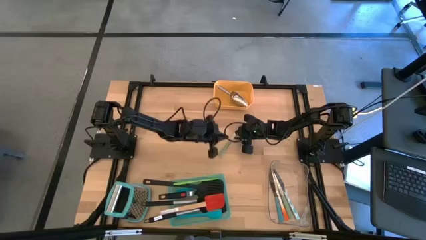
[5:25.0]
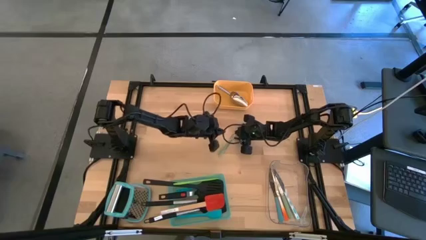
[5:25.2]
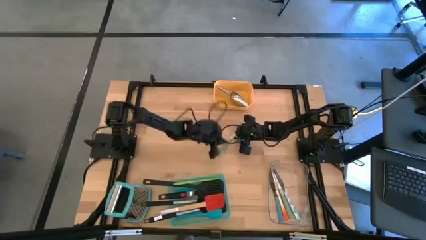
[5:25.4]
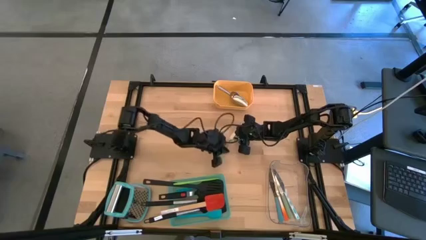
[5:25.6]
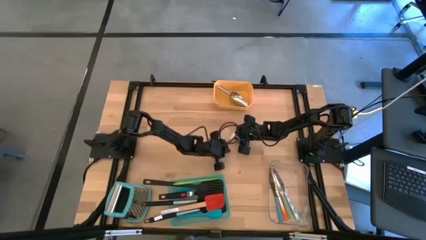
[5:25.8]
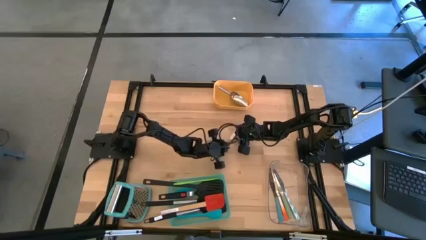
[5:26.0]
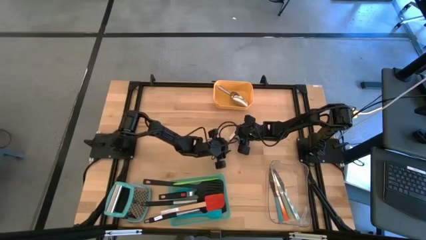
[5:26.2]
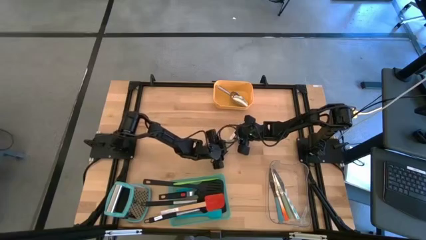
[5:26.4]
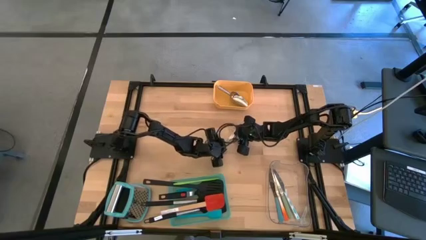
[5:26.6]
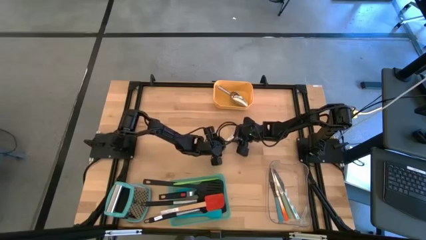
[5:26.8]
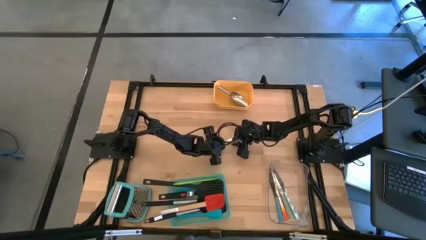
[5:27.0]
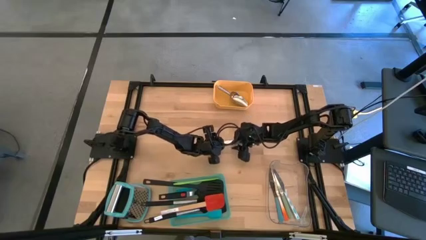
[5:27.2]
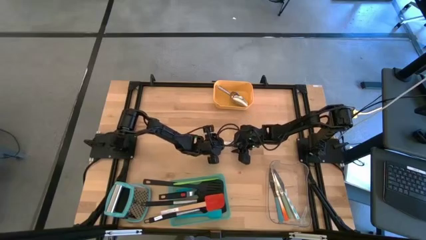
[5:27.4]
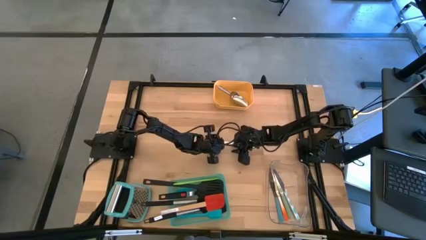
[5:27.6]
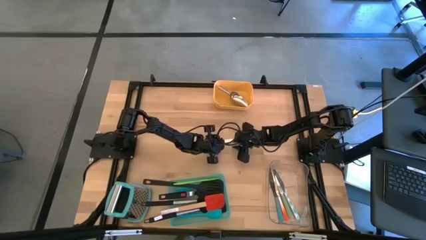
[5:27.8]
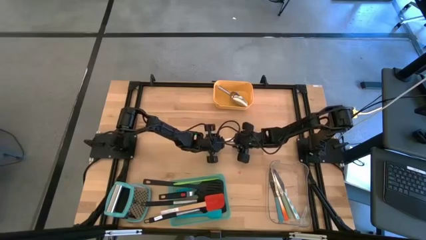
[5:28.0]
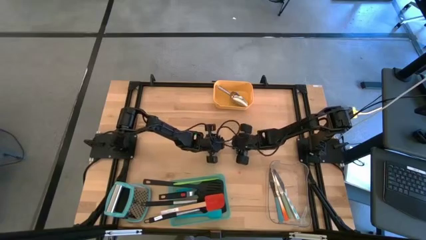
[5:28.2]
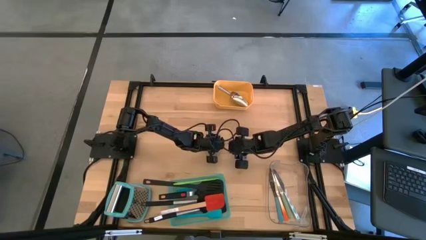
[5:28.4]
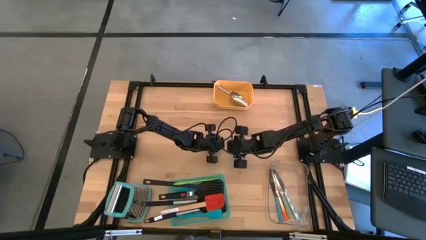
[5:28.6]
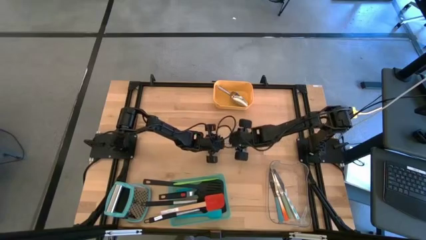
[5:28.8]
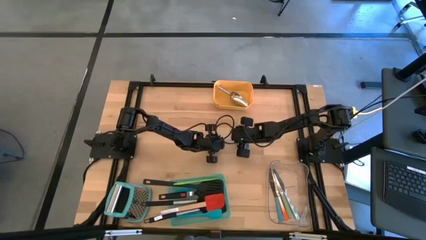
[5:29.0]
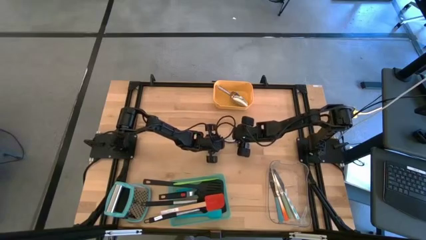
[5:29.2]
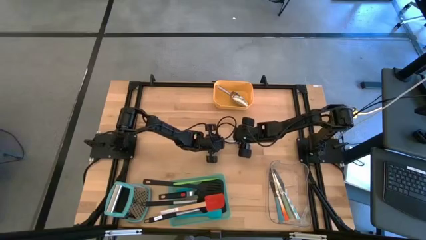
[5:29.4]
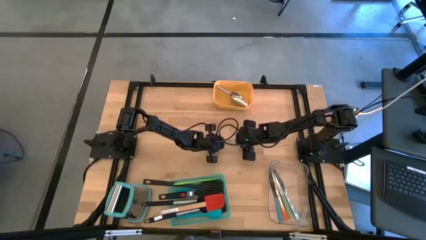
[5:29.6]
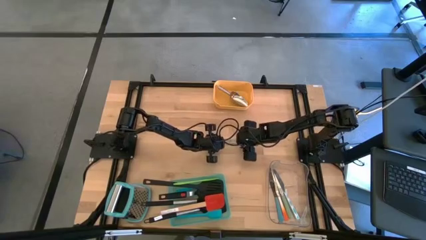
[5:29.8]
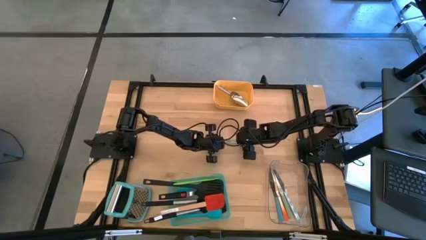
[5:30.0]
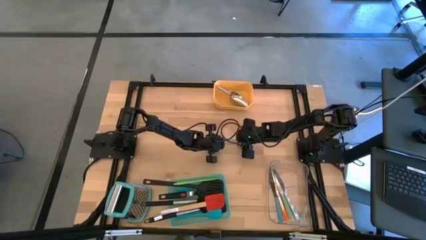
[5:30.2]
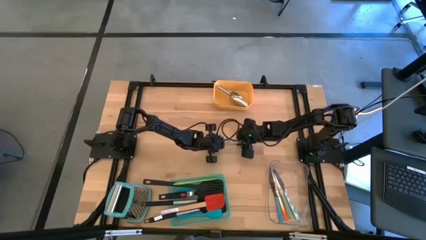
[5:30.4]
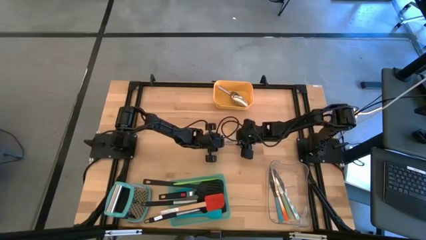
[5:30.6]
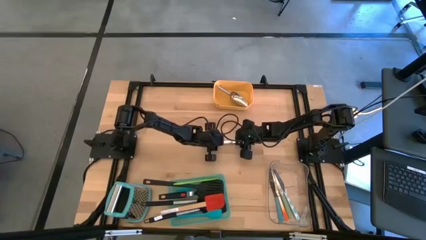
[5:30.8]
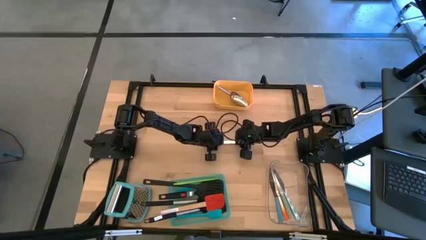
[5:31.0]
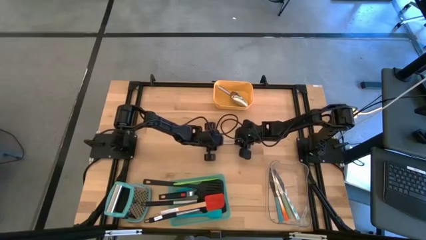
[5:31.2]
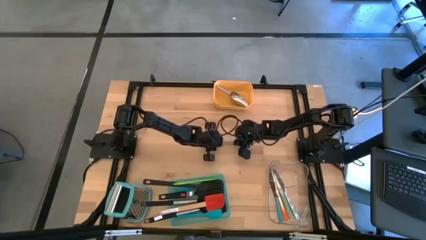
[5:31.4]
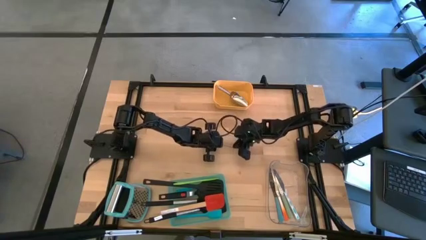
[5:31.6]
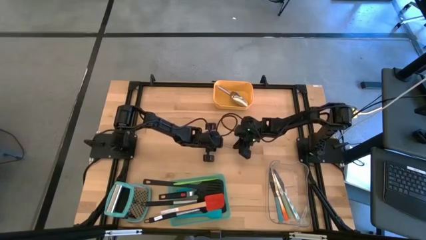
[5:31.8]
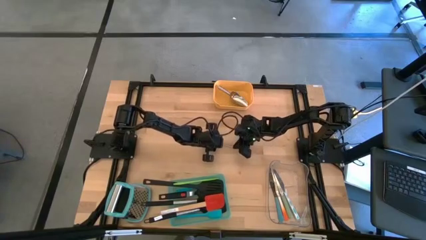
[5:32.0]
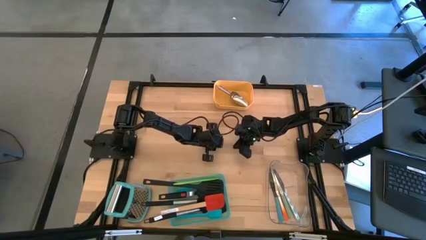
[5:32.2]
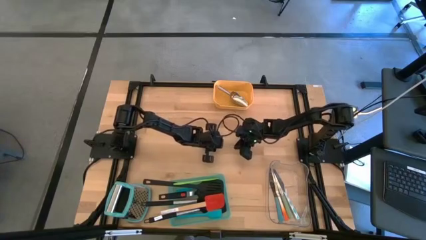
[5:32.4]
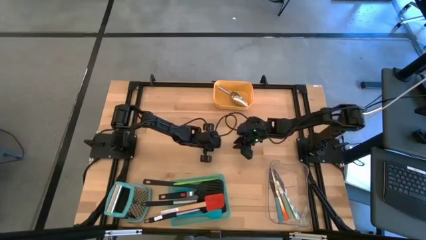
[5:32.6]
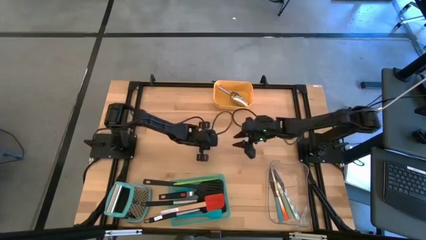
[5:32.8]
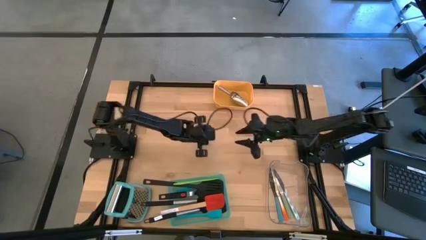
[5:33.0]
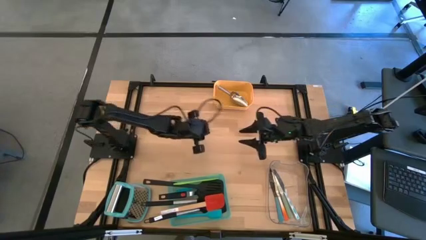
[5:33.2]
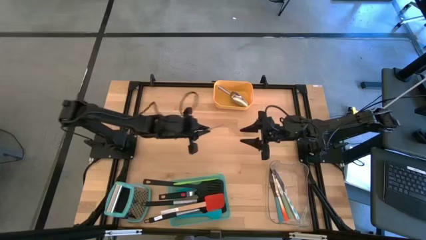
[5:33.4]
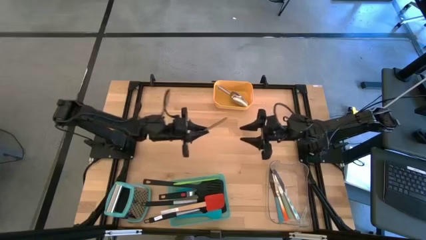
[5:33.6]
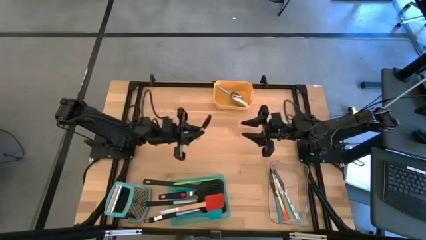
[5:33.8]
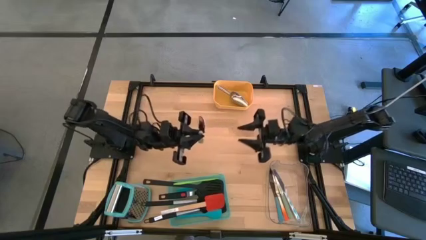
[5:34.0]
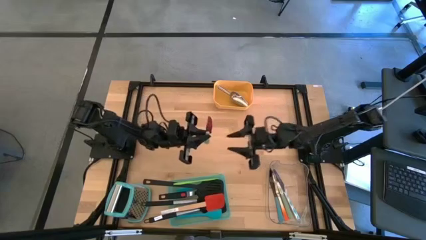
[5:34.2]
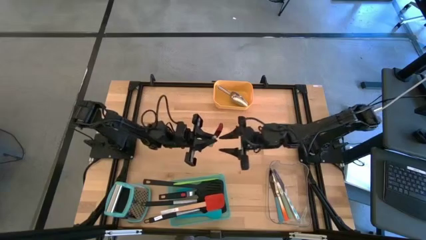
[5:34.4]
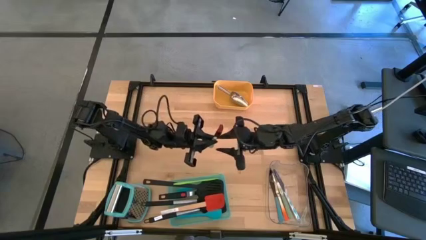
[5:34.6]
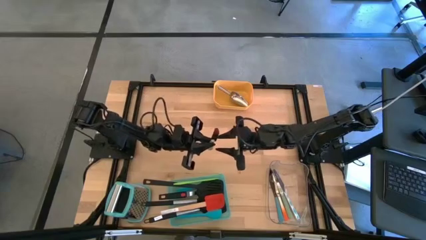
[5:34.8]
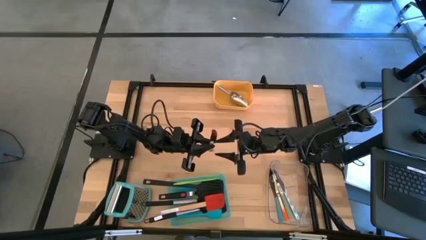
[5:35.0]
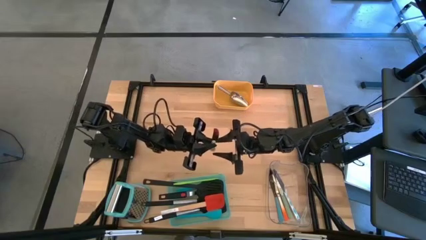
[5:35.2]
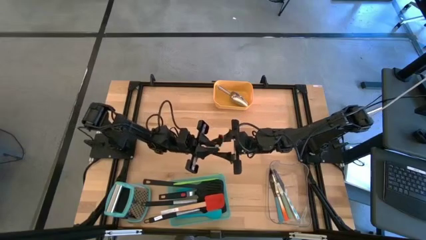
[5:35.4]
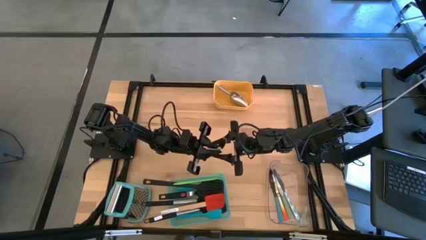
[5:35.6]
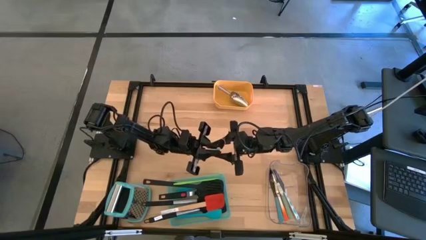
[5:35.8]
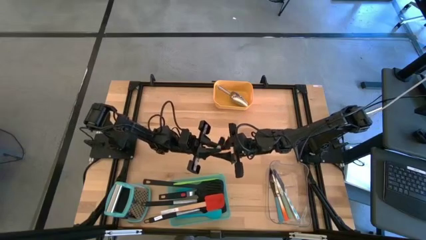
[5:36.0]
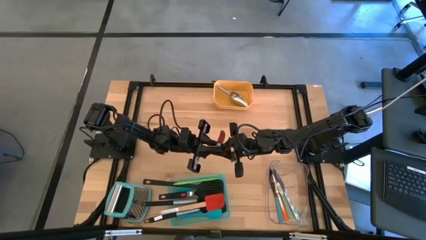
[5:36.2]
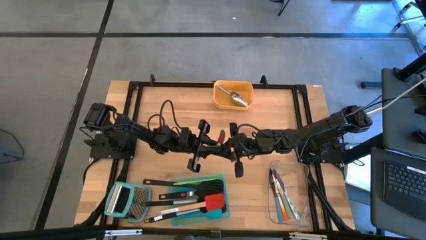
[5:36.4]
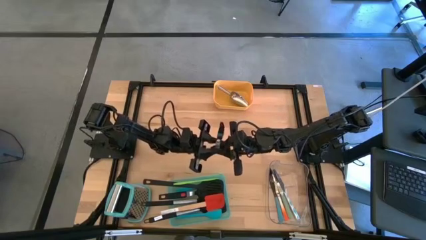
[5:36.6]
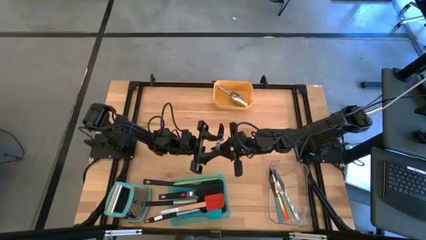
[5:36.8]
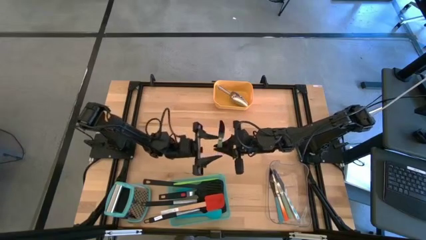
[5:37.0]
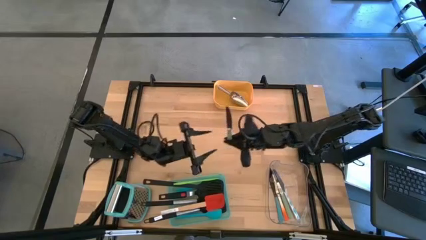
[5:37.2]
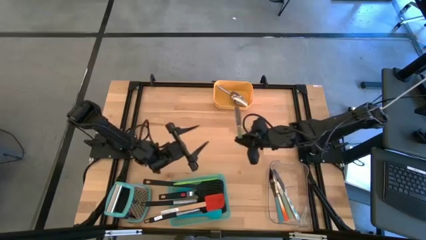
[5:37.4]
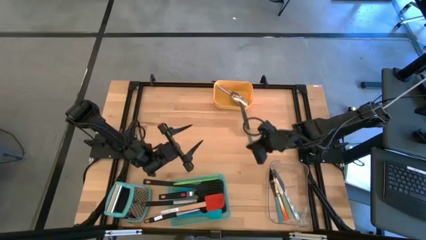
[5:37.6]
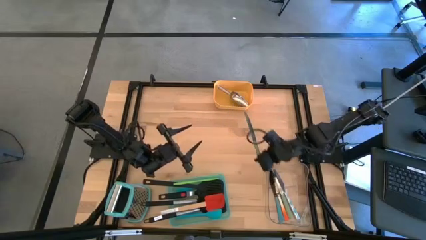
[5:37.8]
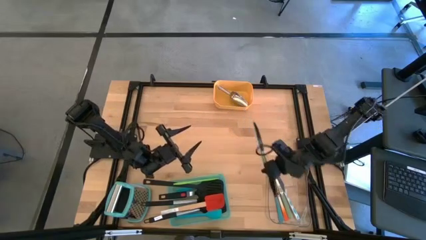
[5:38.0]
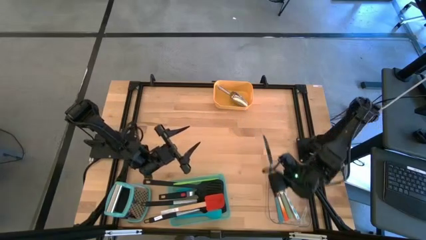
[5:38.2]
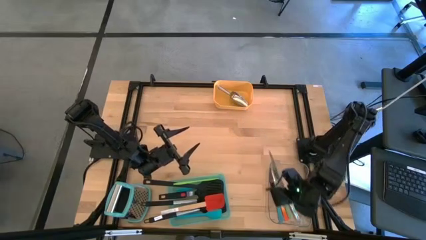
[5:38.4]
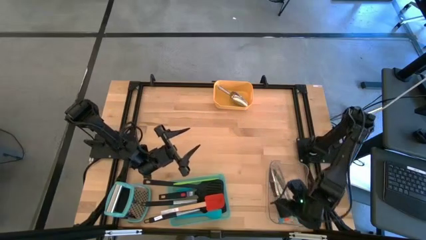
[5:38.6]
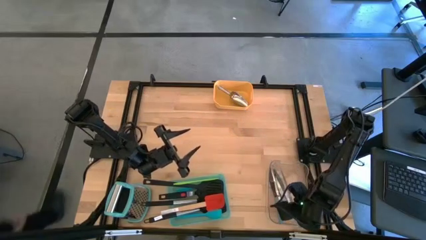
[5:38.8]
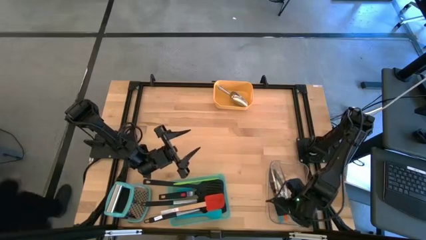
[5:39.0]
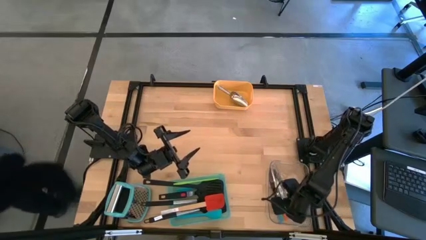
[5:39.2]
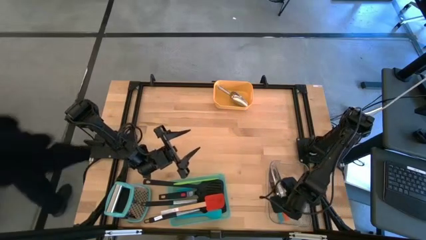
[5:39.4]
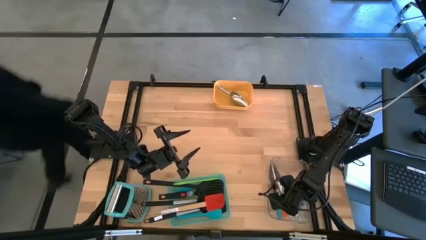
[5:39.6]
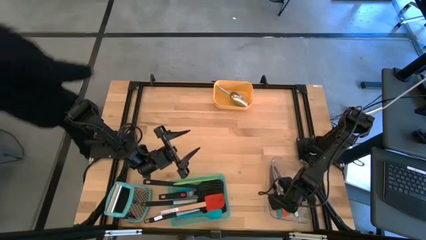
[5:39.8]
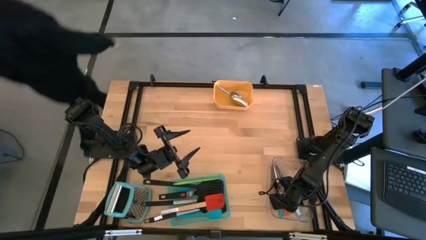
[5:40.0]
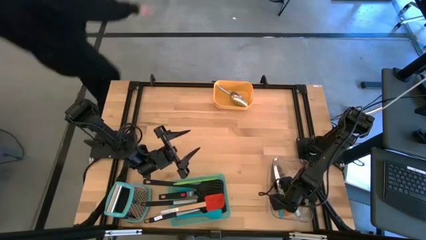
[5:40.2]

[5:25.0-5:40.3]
Task: Pick & Place Kitchen Items
Put the green table knife into the transparent bin
